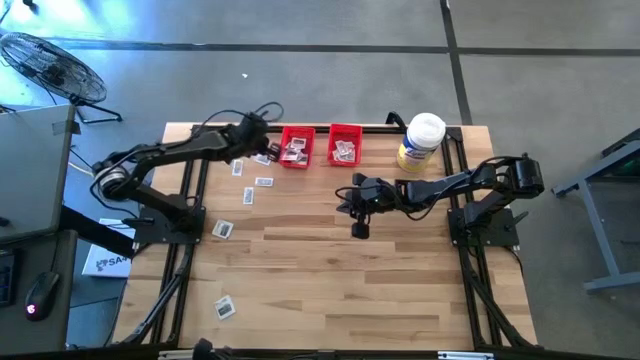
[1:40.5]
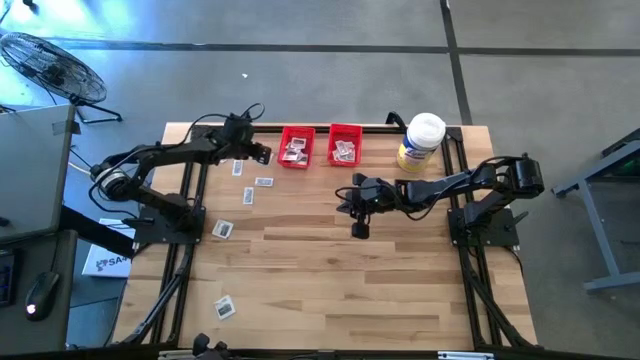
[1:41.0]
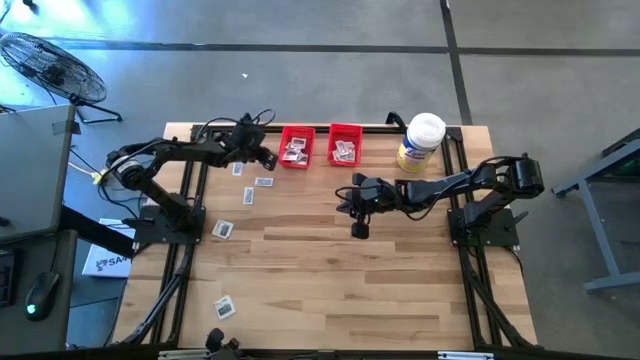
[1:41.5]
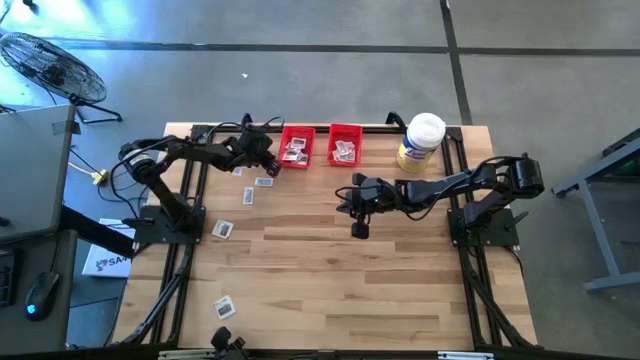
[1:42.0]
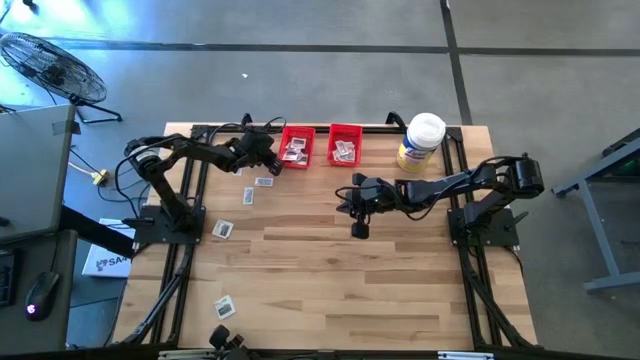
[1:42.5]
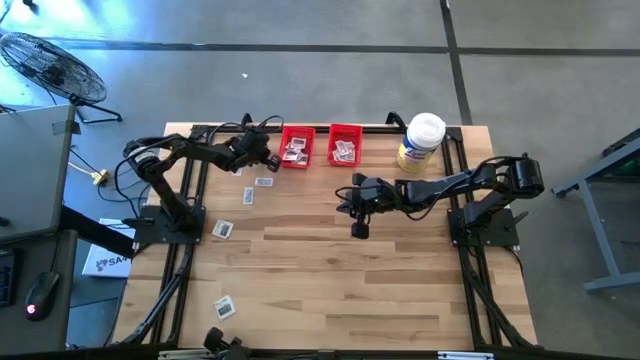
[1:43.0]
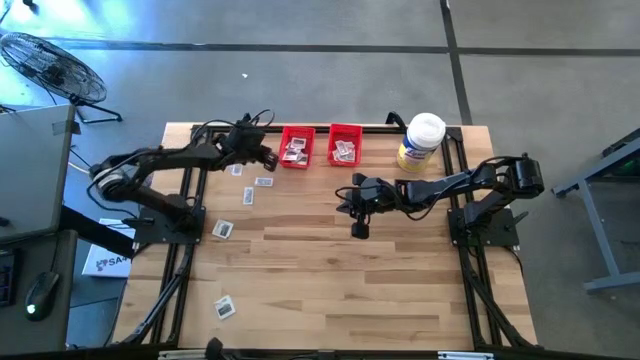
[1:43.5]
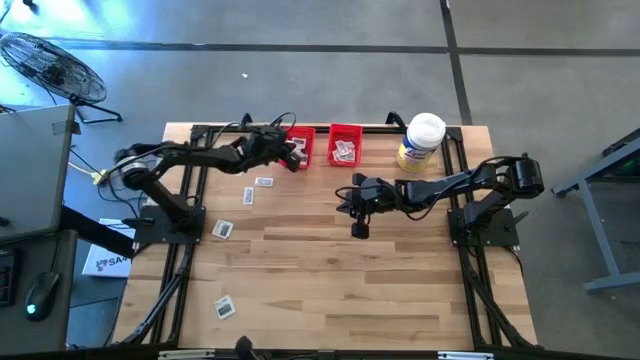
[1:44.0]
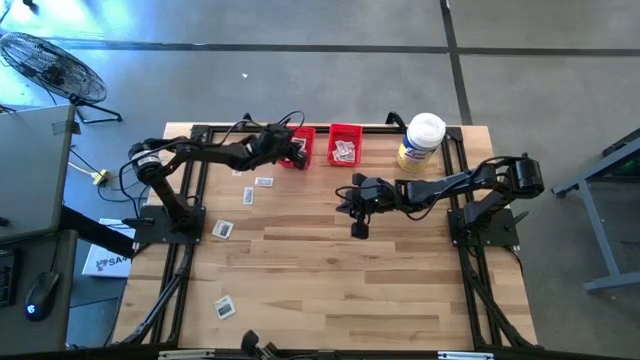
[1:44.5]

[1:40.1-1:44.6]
Task: Pick & Place First Aid Supplies
Put the towelette pack into the left red bin

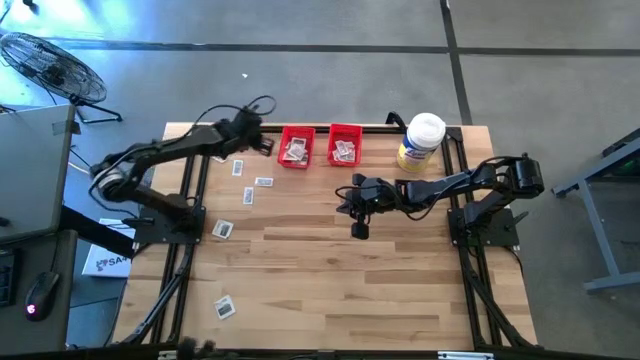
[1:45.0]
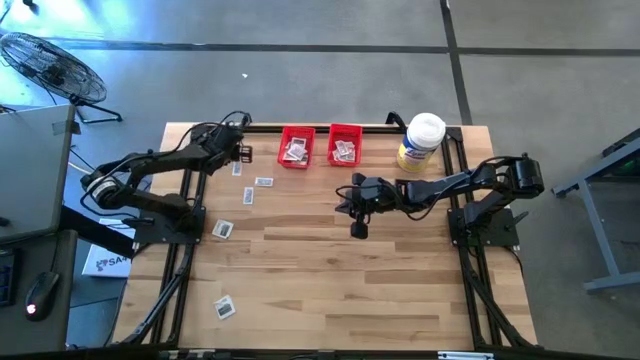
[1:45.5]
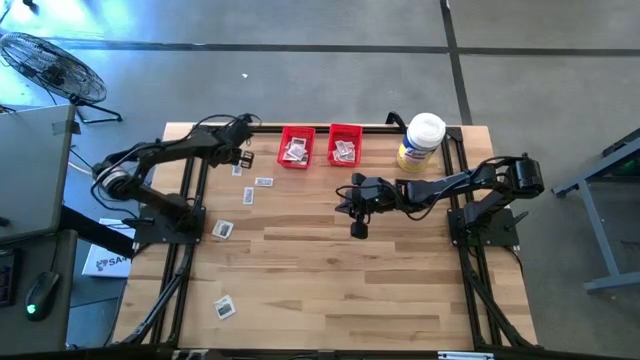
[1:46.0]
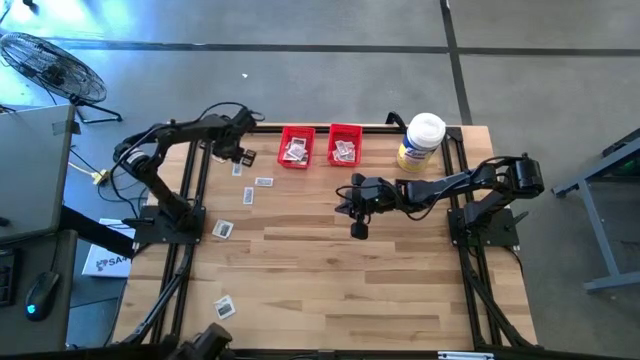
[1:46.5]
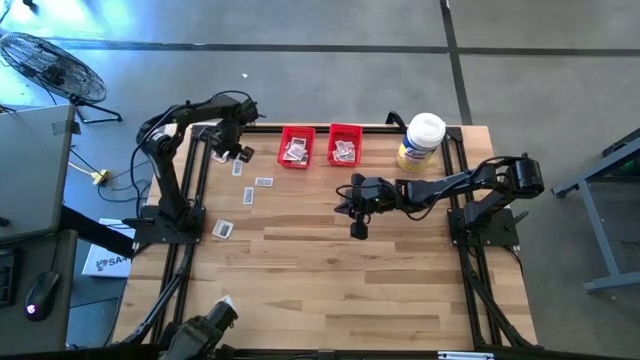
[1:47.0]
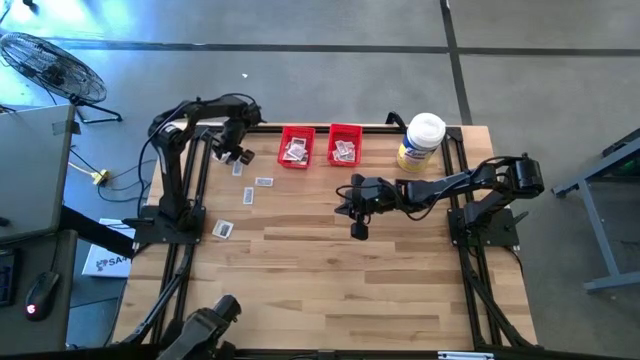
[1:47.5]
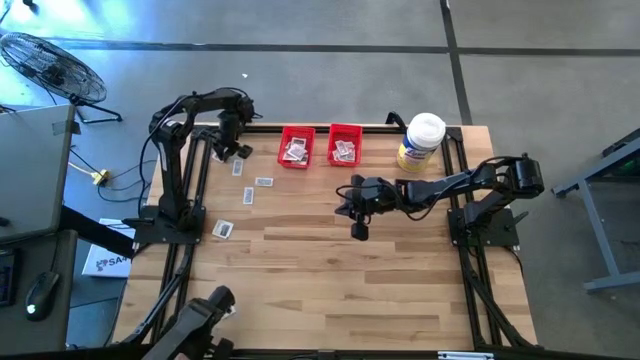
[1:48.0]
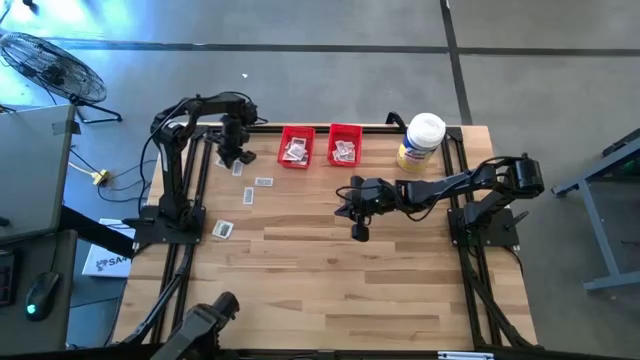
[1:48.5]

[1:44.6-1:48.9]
Put the towelette pack into the left red bin

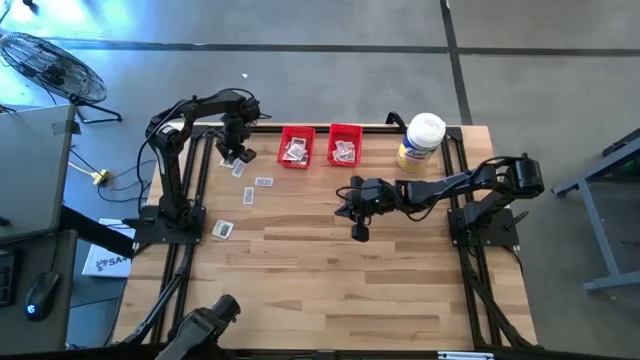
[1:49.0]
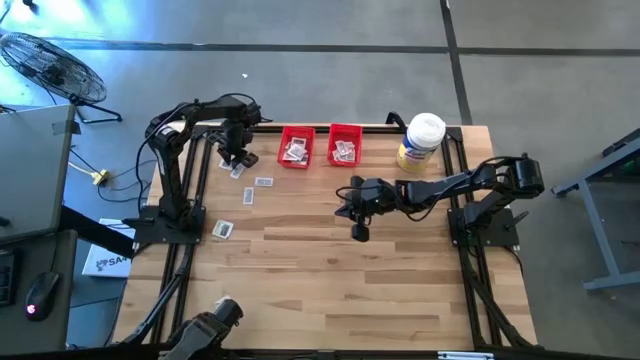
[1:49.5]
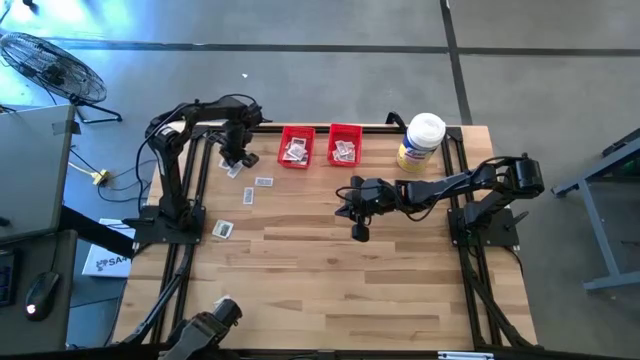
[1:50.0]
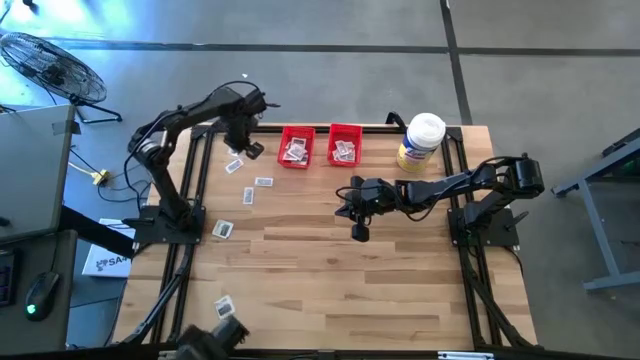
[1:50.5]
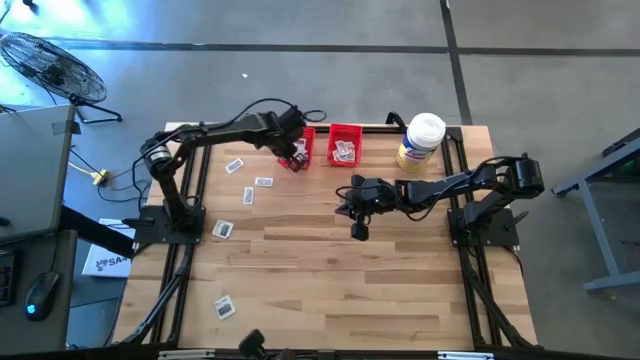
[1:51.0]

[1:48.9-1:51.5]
Put the towelette pack into the left red bin

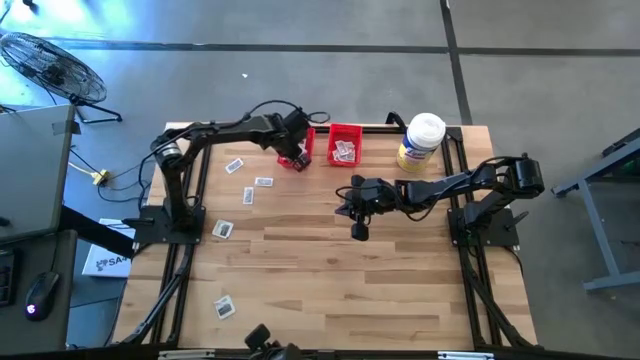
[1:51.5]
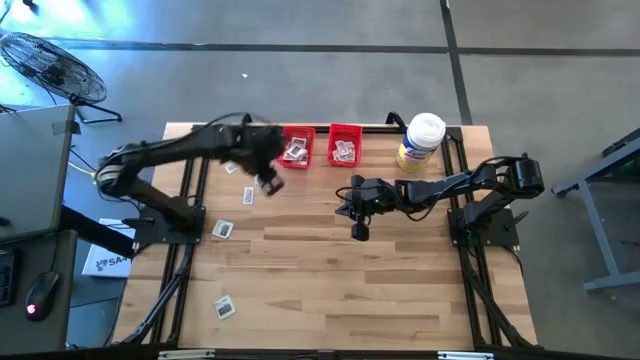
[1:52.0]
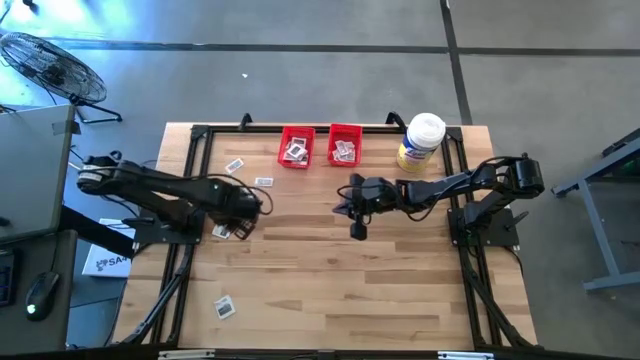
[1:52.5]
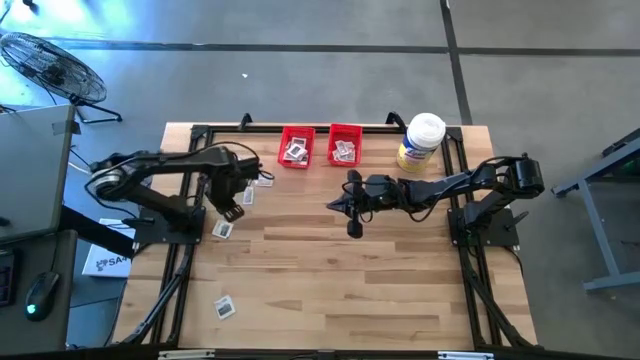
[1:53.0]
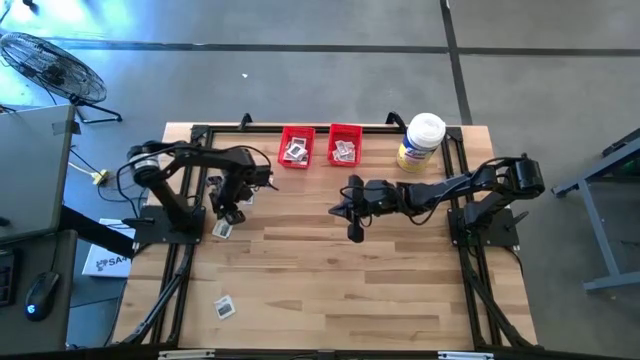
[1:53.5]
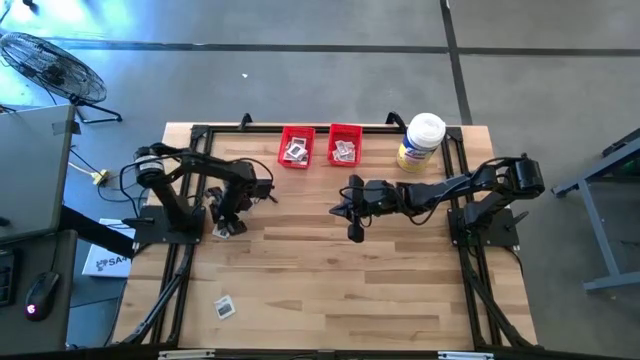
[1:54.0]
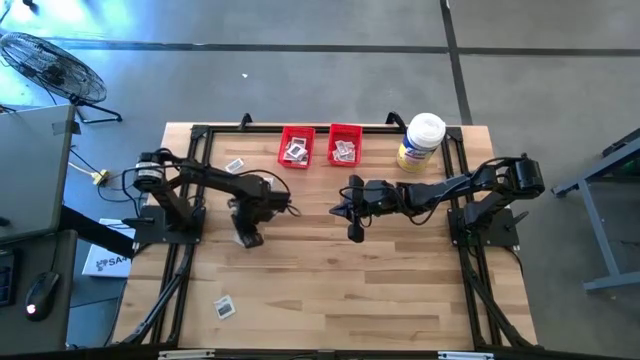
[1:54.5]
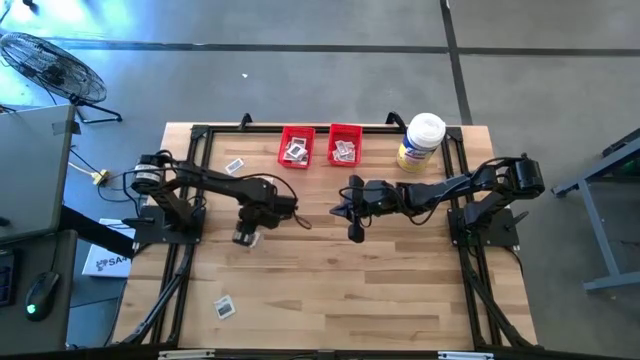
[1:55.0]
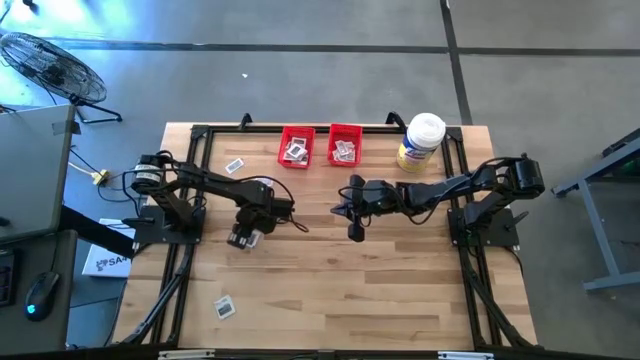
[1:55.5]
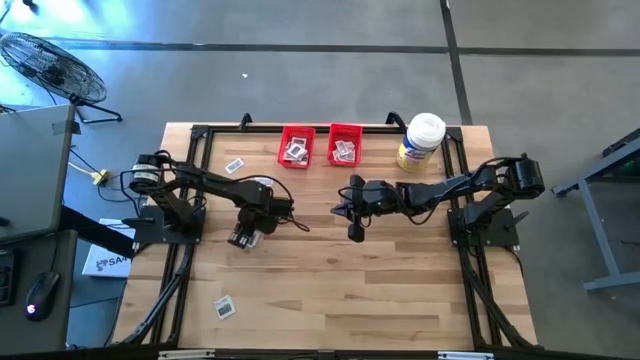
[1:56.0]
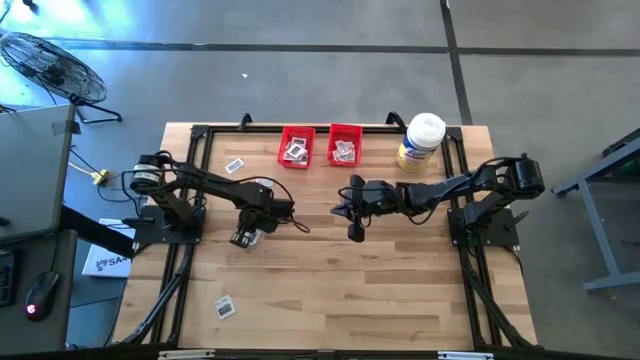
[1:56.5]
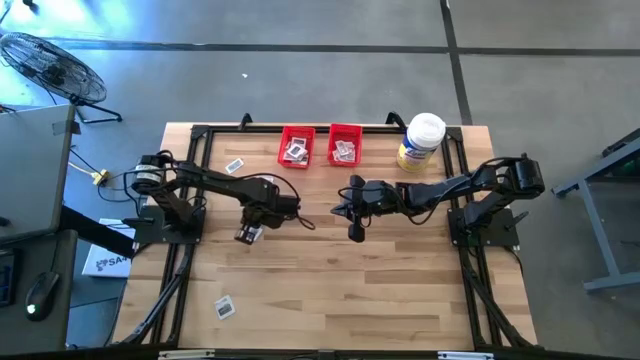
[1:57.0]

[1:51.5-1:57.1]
Put the towelette pack into the left red bin

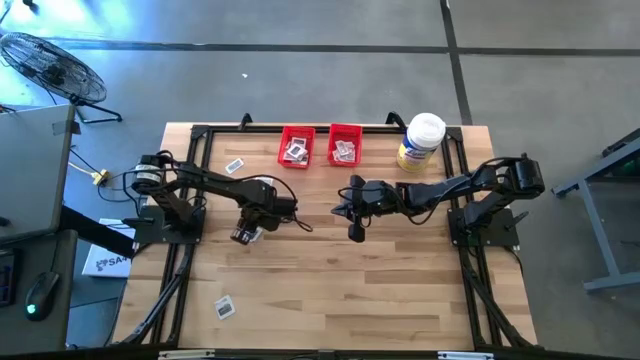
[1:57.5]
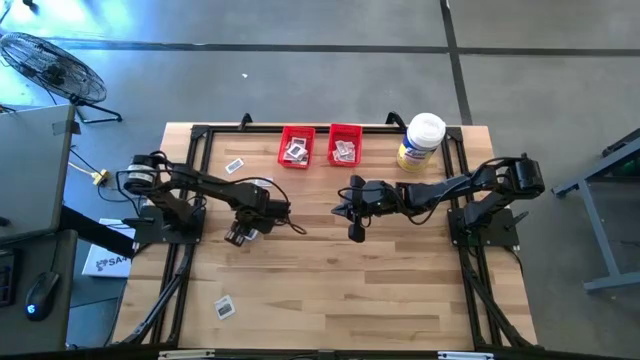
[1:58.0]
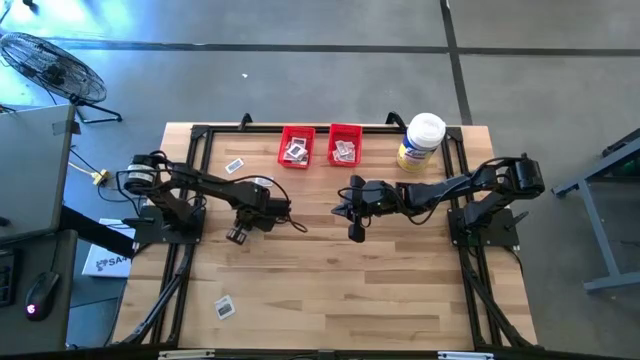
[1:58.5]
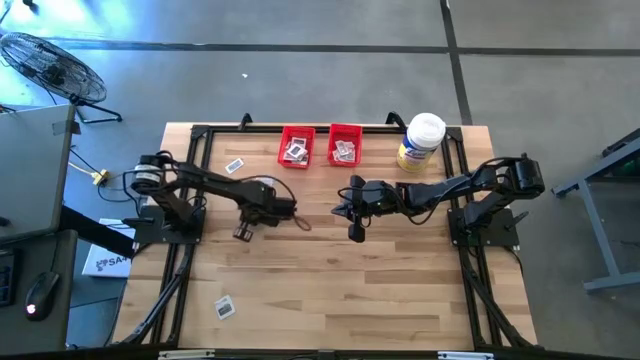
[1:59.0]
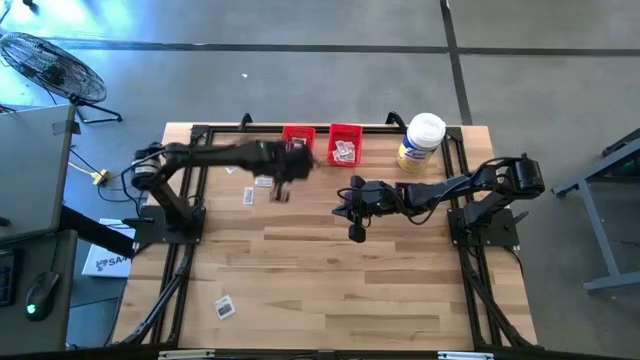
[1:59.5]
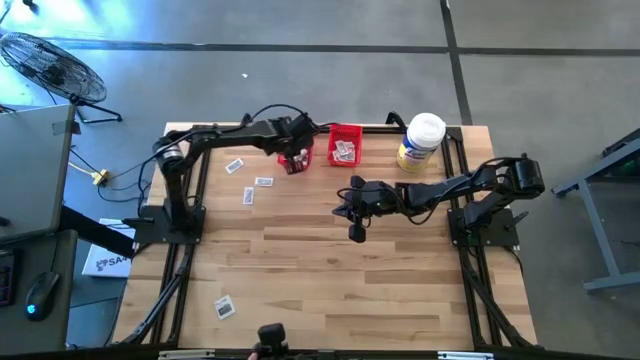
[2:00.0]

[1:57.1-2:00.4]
Put the towelette pack into the left red bin
